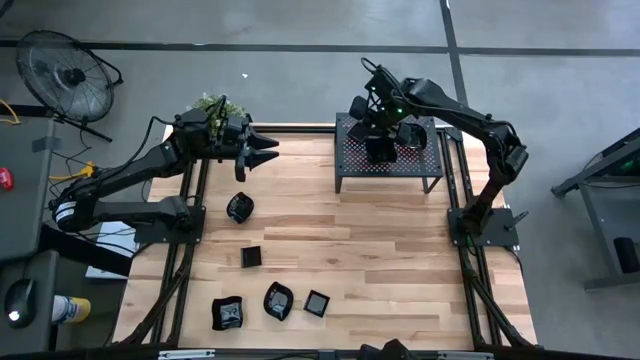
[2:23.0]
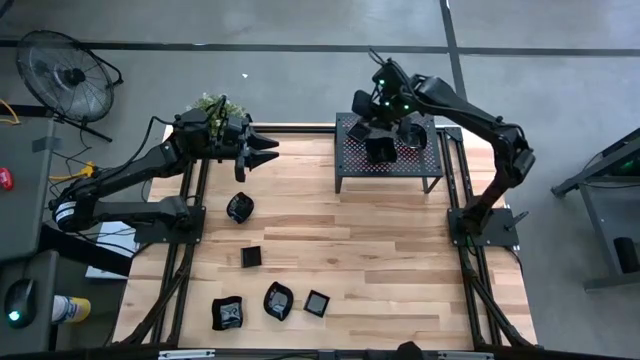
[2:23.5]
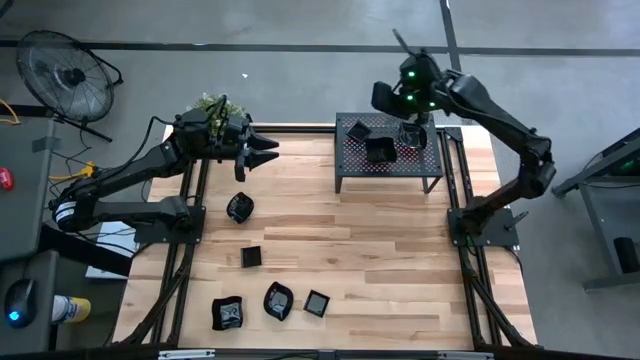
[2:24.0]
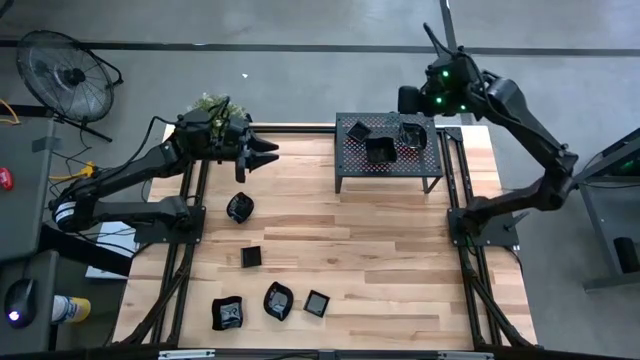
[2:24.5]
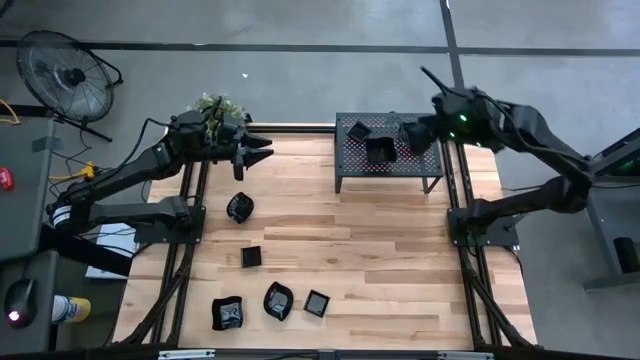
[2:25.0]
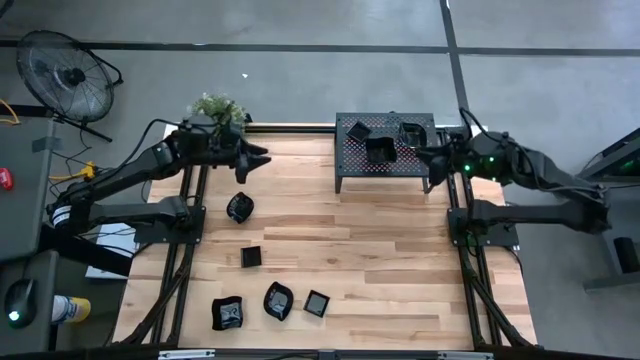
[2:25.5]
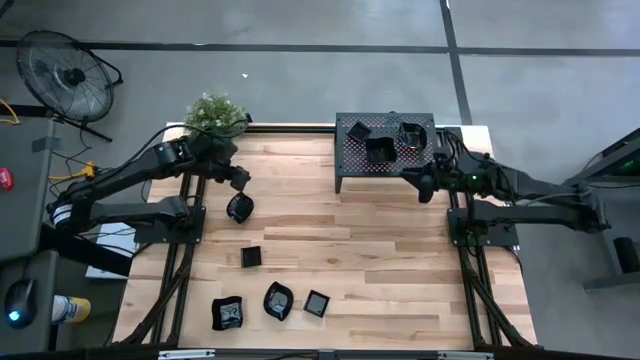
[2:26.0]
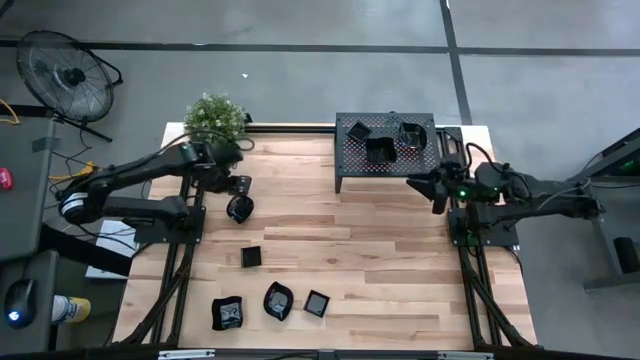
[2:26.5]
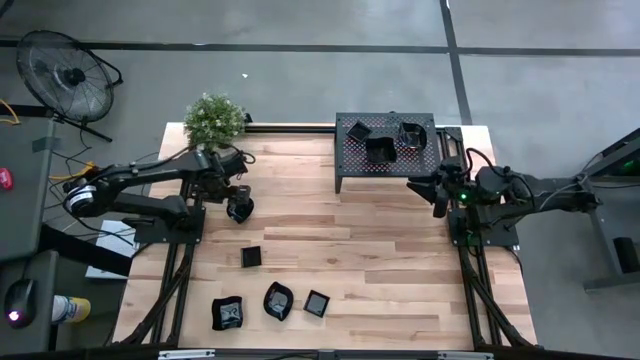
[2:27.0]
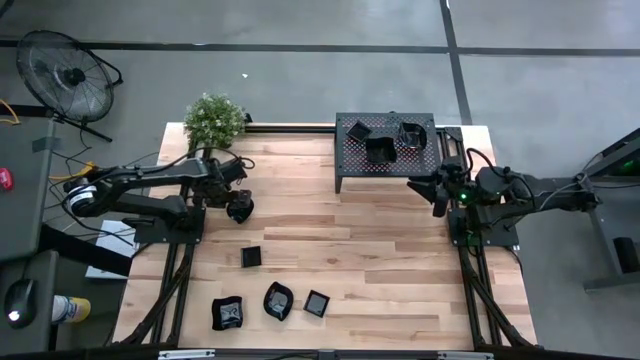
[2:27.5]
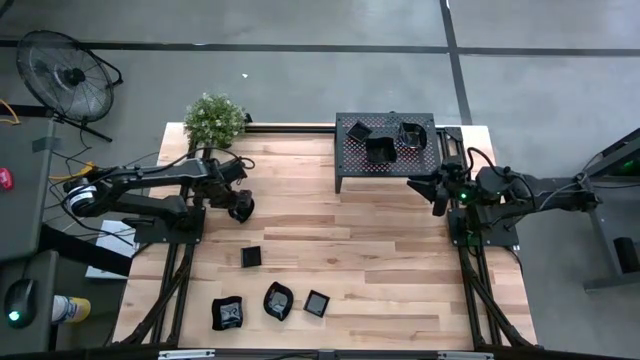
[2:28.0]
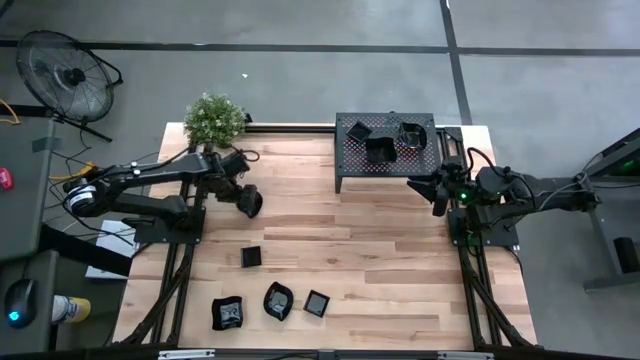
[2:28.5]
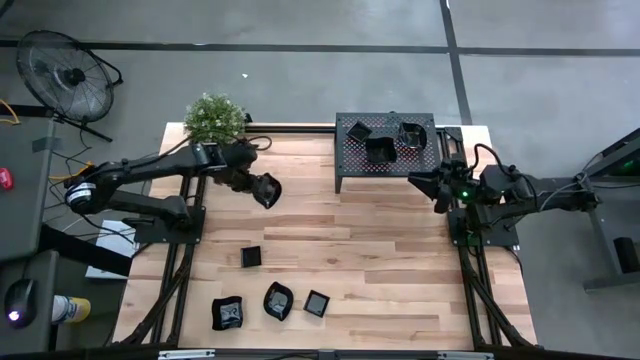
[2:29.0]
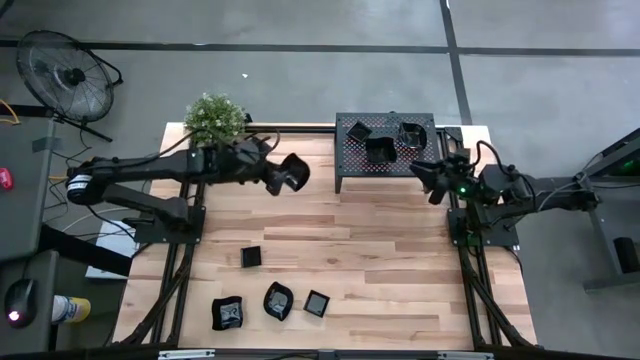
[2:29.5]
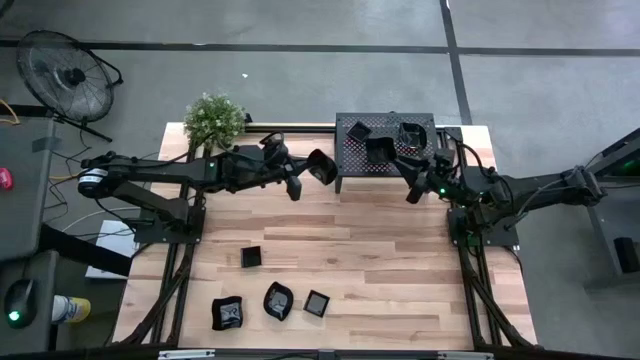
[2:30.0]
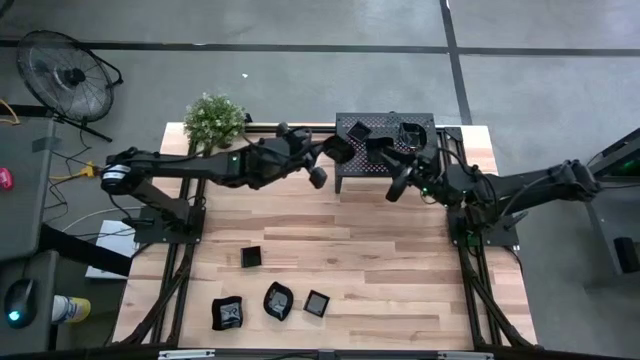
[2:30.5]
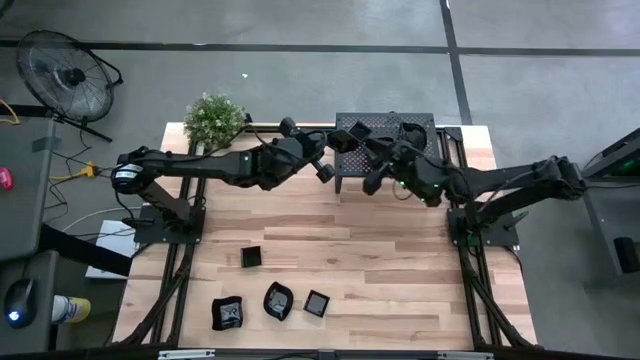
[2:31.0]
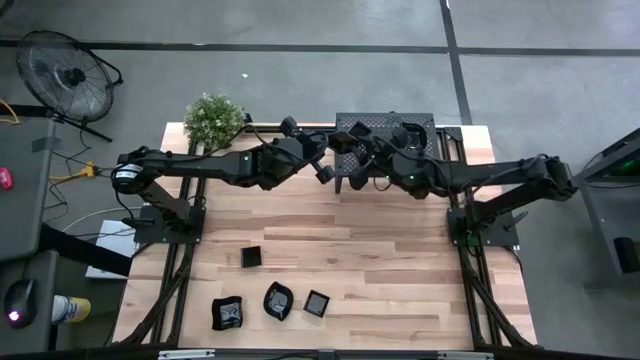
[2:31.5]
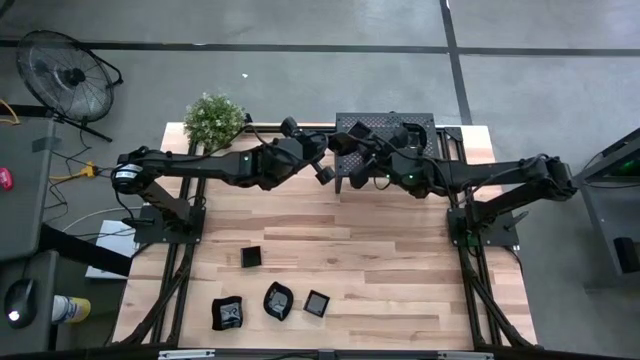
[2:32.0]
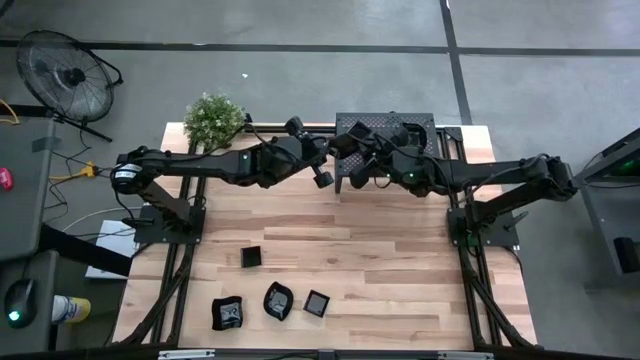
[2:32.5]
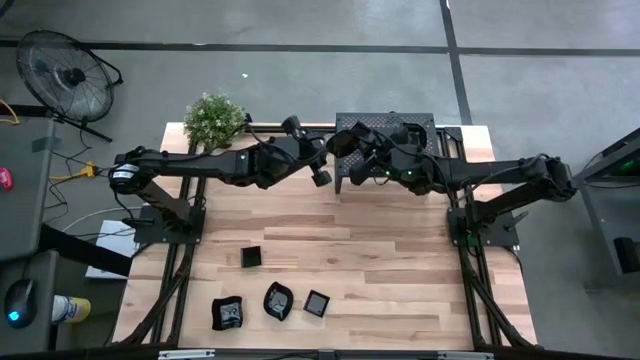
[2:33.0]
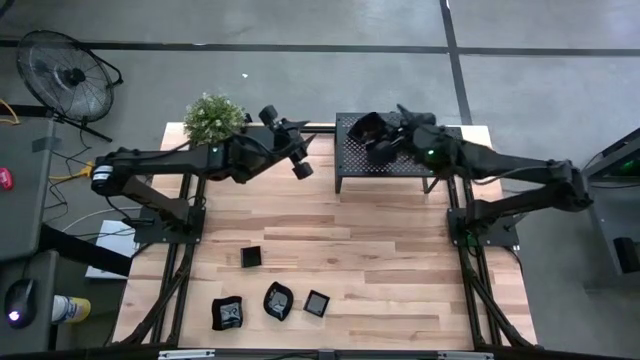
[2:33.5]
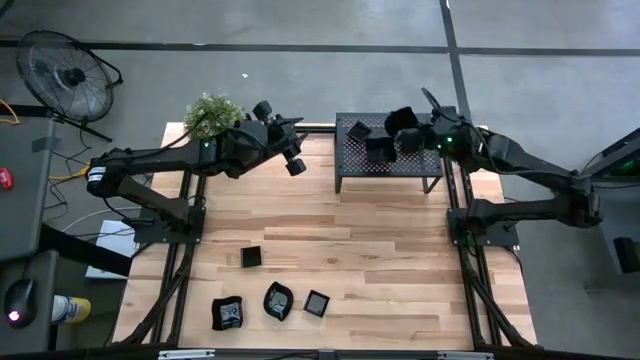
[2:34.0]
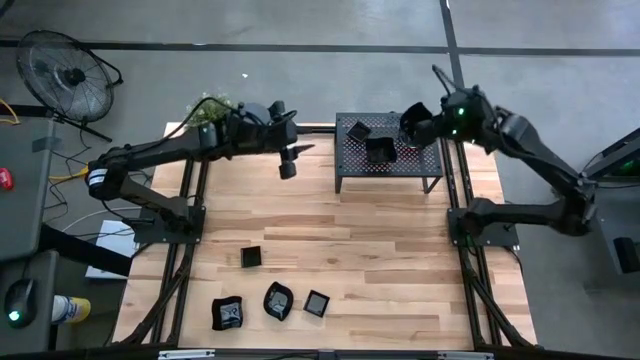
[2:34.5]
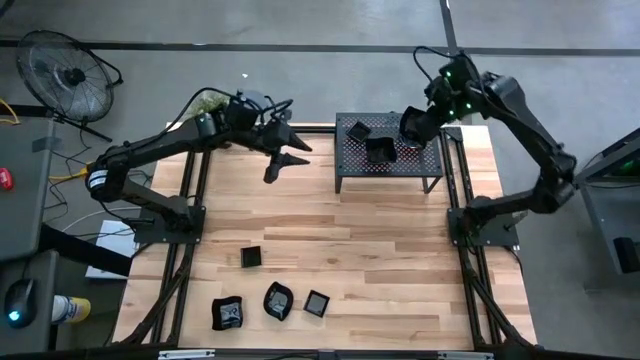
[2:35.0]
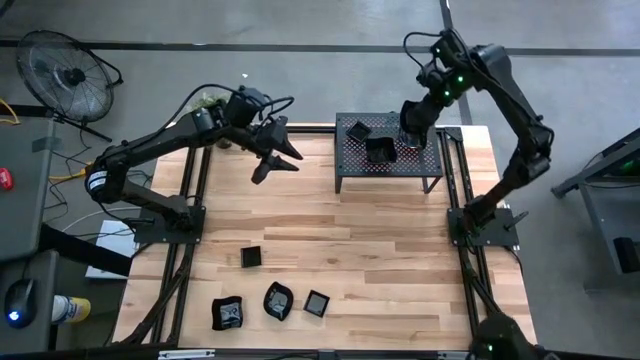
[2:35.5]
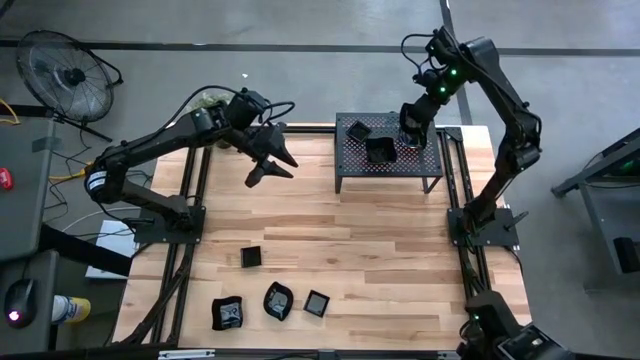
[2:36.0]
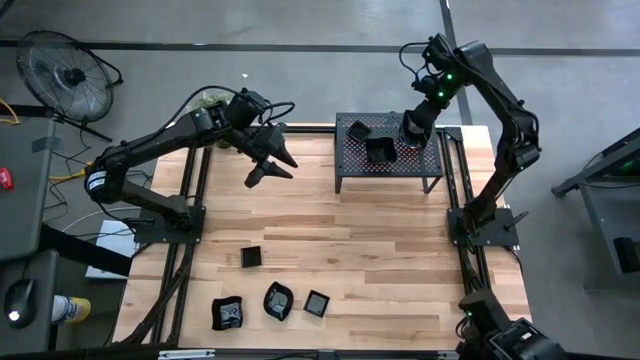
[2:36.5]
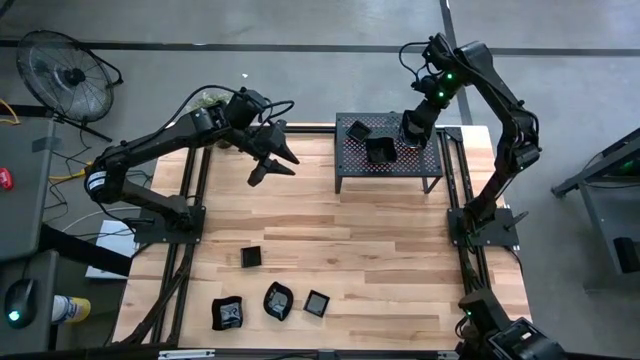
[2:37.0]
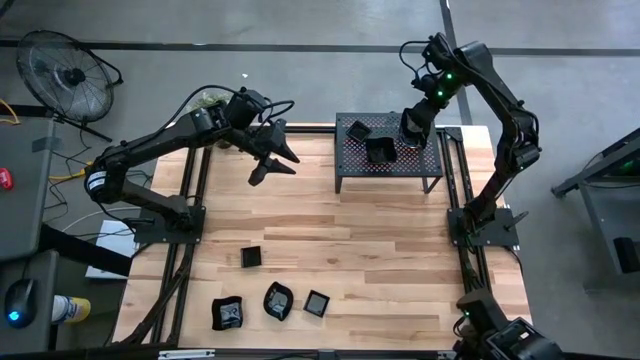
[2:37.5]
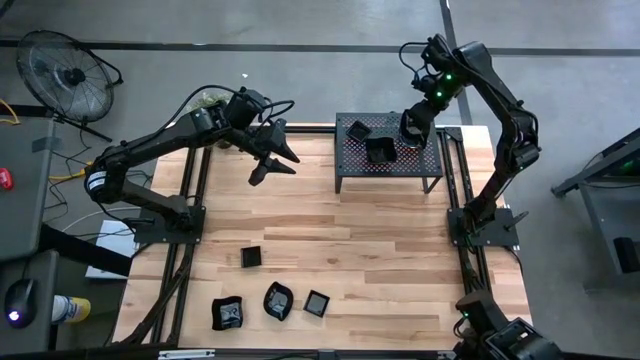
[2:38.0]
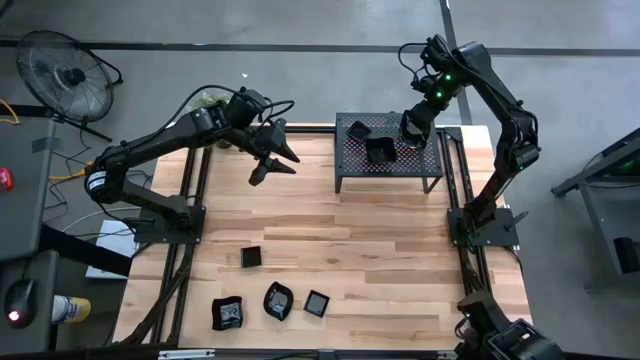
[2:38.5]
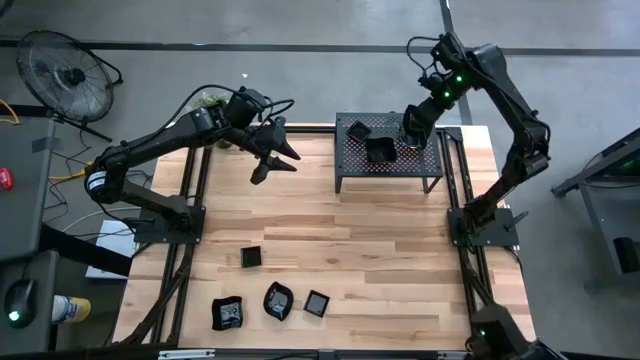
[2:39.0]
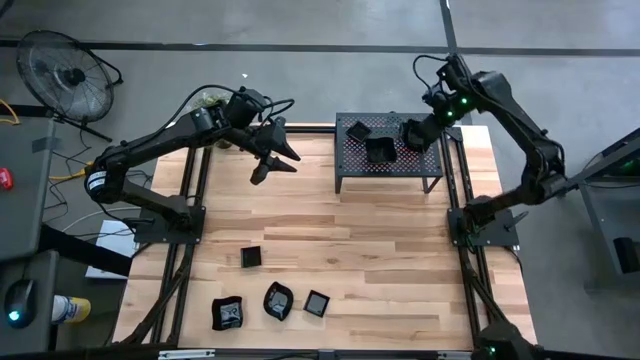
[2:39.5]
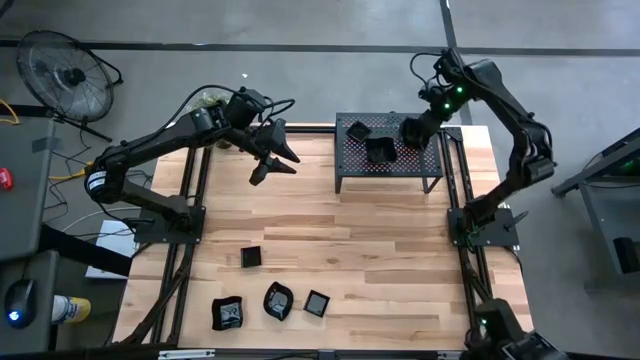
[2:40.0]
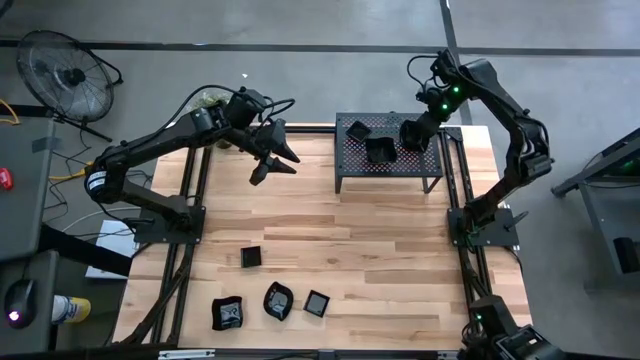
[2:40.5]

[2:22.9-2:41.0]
Task: Pick & Place Mini shaped plates
Stack the black leaf-shaped plate on top of the black leaf-shaped plates on the shelf
